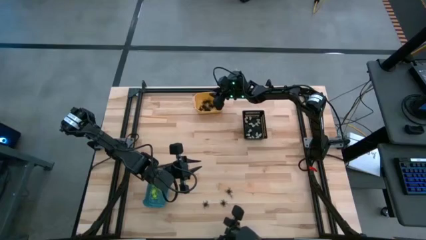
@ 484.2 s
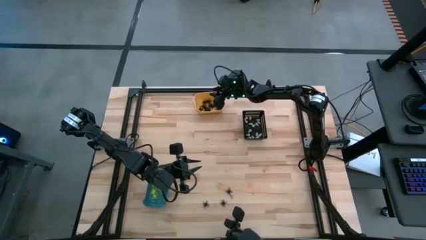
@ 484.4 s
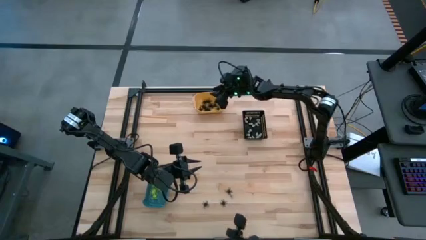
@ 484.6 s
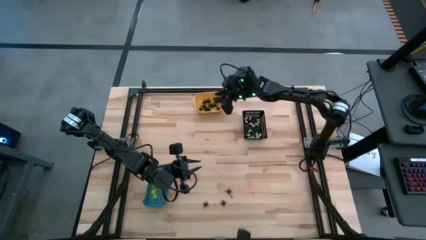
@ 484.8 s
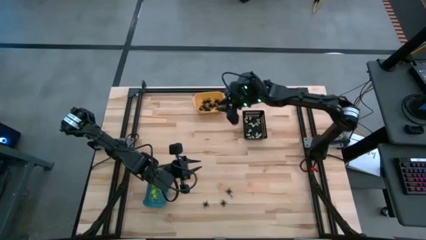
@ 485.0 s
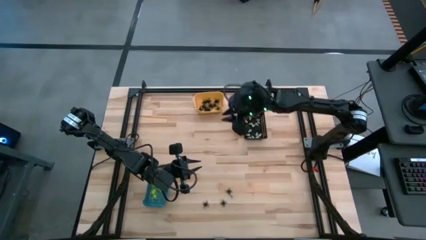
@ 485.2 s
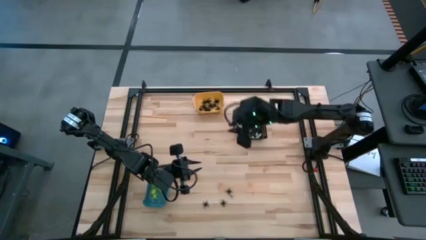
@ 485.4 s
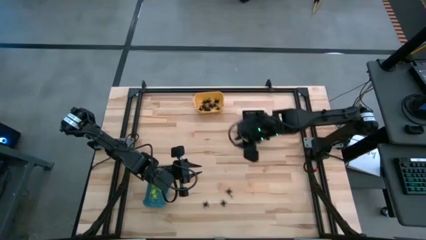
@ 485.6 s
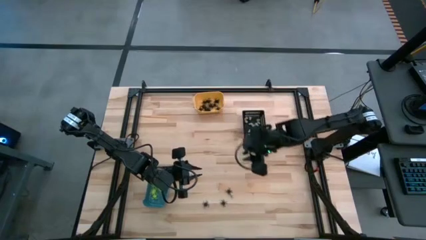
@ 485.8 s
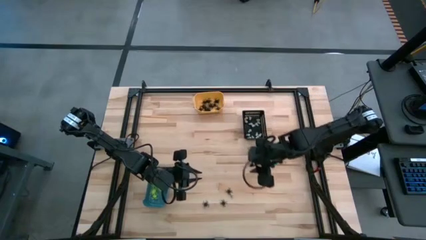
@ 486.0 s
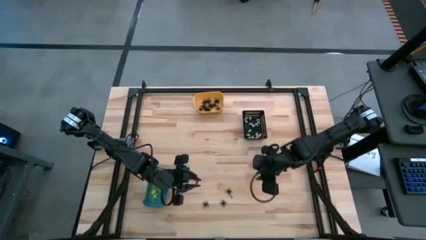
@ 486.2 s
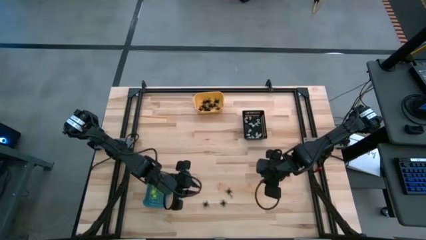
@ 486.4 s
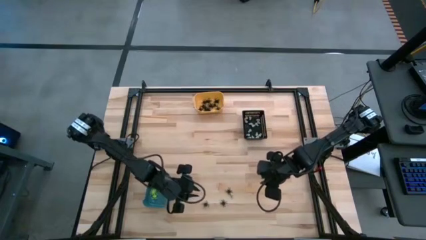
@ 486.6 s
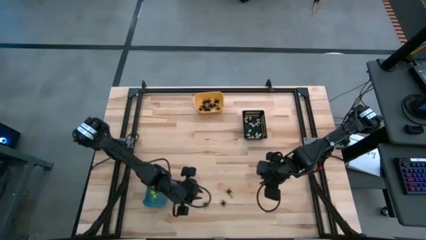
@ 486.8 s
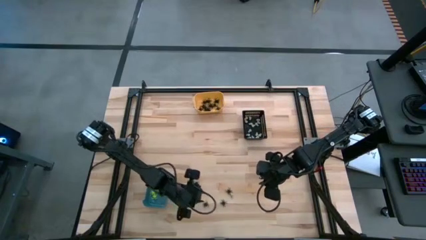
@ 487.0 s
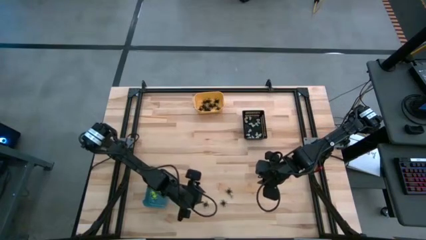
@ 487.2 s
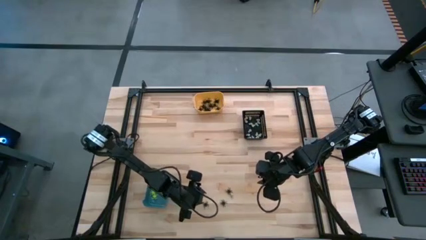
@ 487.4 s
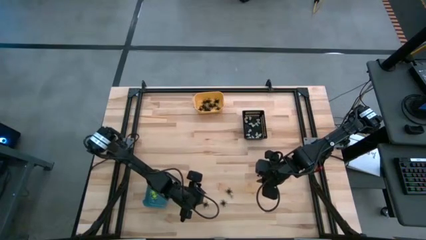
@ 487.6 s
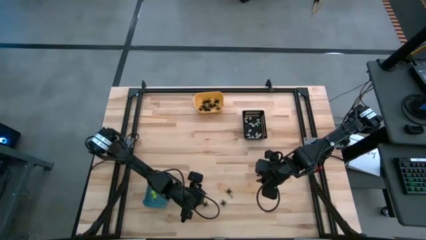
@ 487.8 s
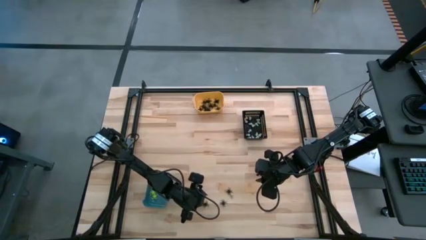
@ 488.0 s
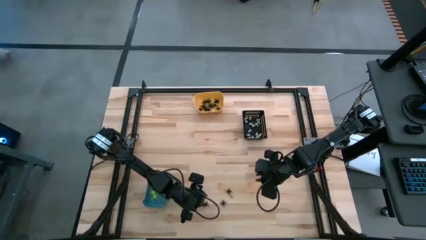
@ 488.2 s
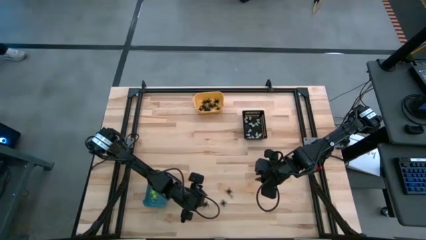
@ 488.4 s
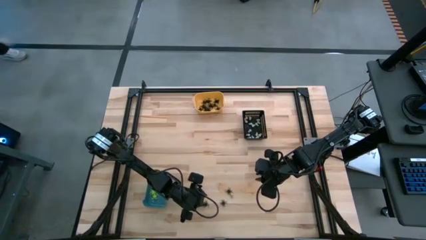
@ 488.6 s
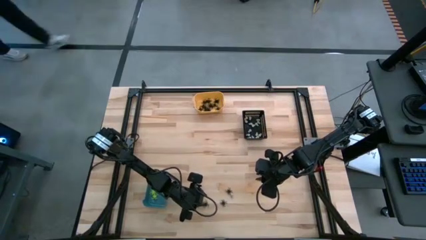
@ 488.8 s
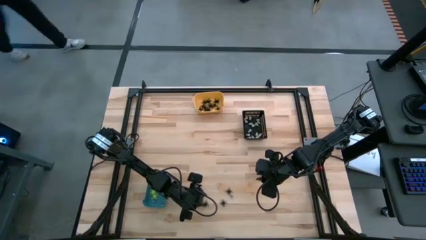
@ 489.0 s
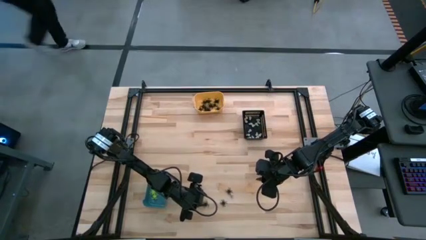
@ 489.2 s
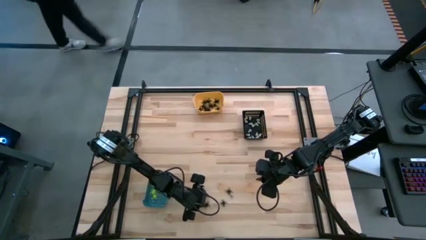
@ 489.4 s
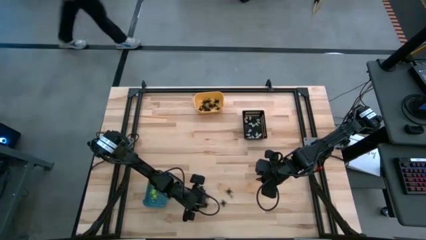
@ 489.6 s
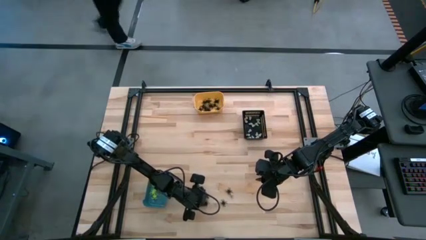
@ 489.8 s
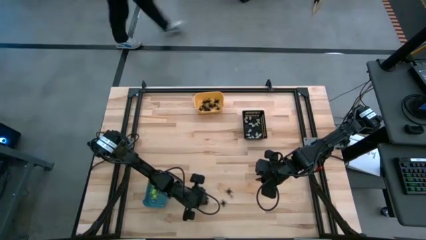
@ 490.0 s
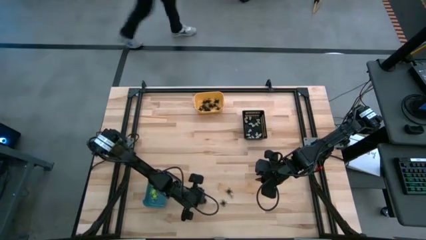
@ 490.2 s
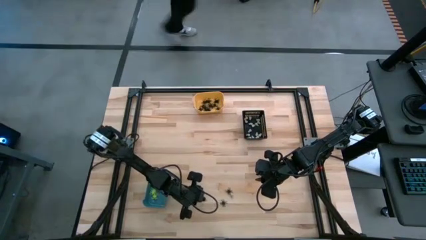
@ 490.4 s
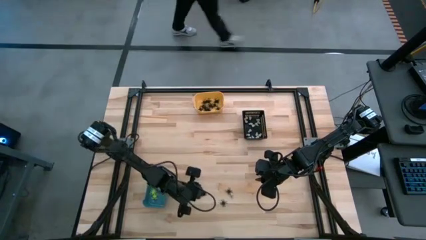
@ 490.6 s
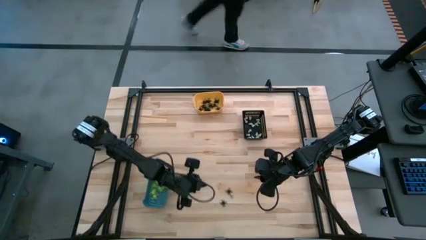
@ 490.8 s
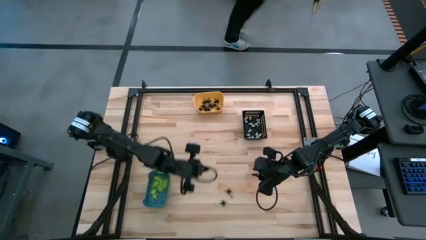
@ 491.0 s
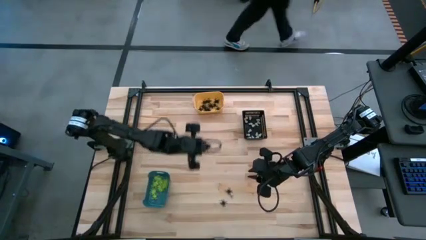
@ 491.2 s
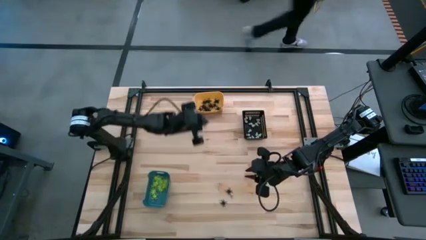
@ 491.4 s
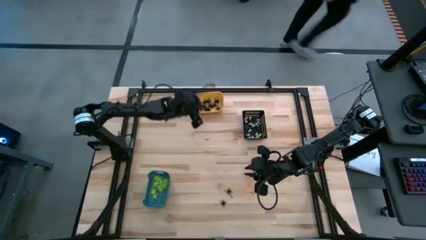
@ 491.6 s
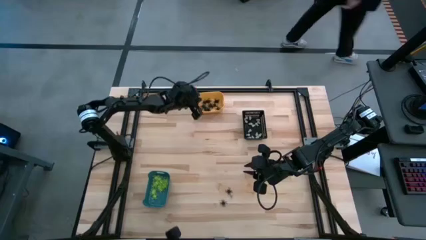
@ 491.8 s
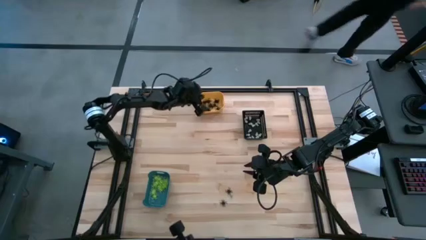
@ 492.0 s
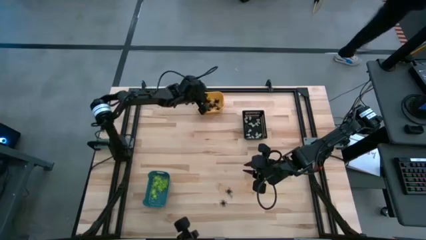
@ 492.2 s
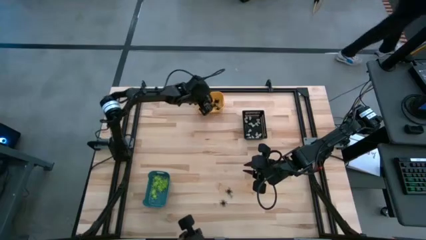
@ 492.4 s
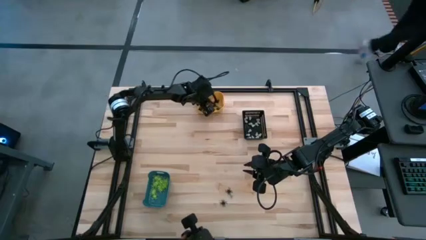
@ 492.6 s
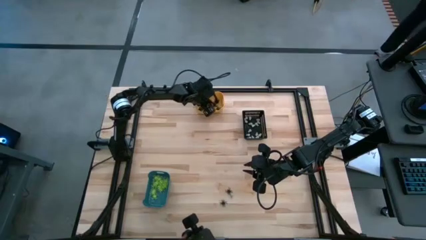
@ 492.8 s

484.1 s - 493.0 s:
Task: Sort Halloween decoration
Put the black spider toy into the yellow bin

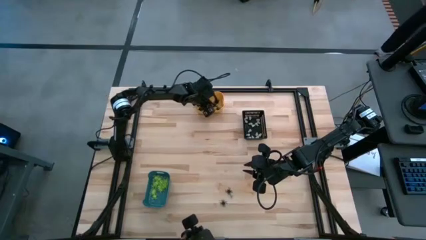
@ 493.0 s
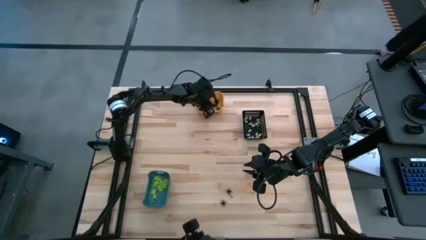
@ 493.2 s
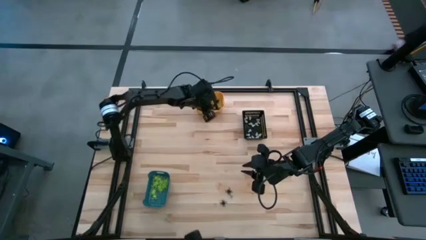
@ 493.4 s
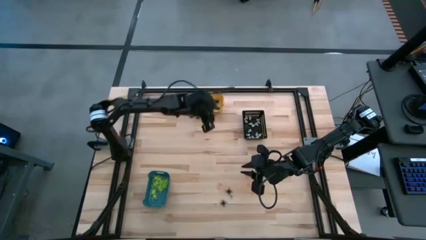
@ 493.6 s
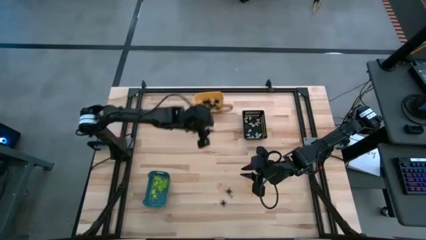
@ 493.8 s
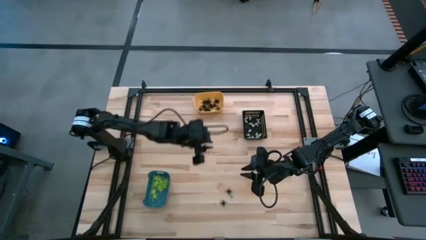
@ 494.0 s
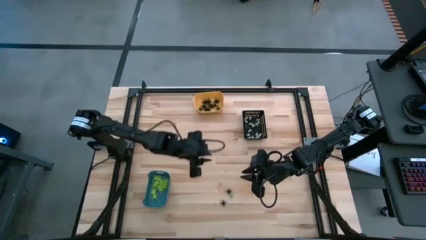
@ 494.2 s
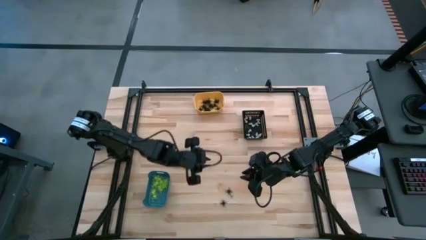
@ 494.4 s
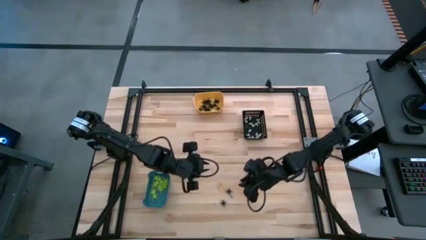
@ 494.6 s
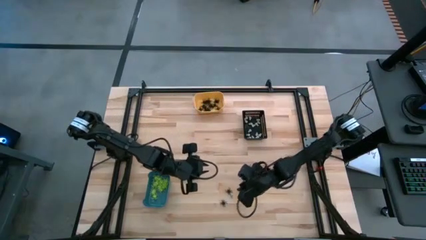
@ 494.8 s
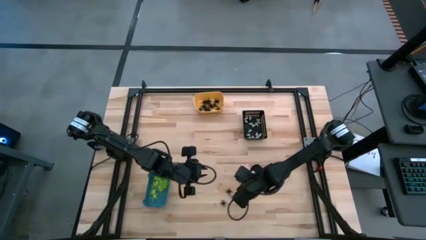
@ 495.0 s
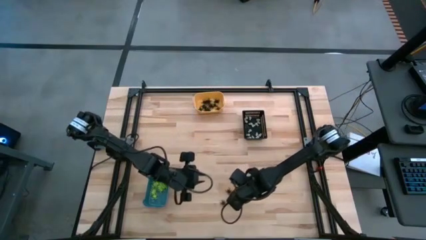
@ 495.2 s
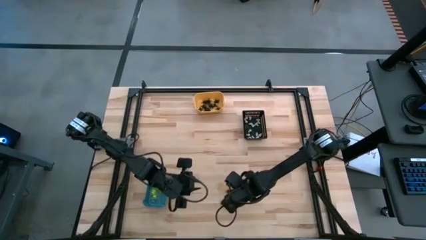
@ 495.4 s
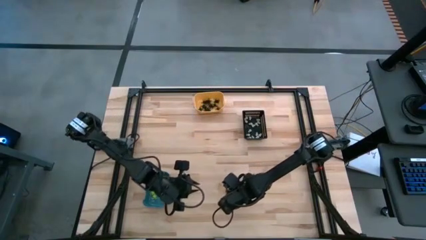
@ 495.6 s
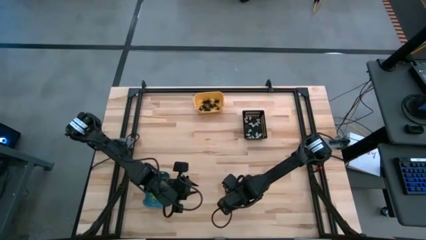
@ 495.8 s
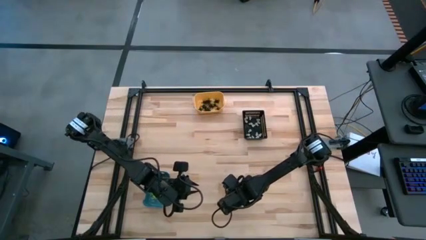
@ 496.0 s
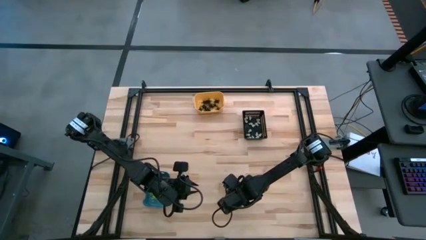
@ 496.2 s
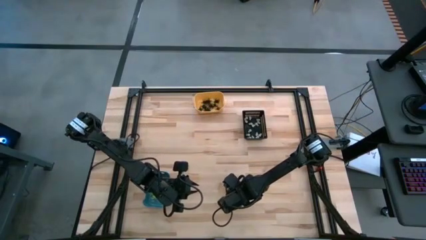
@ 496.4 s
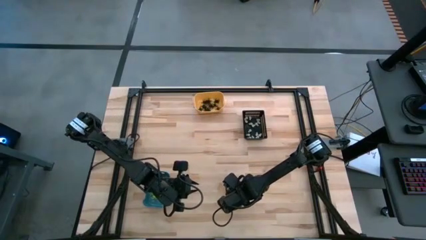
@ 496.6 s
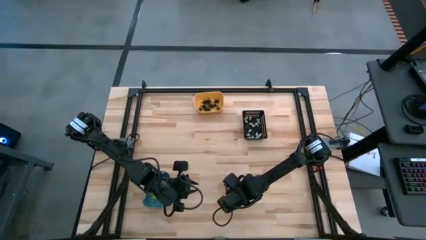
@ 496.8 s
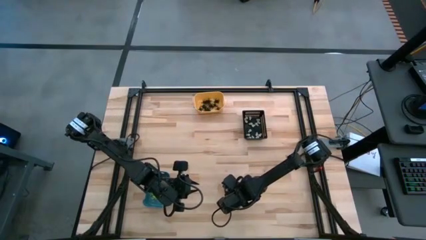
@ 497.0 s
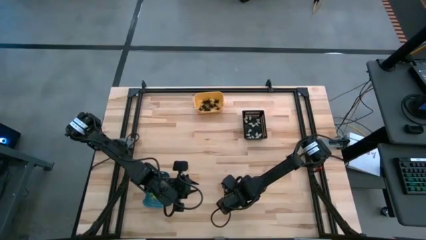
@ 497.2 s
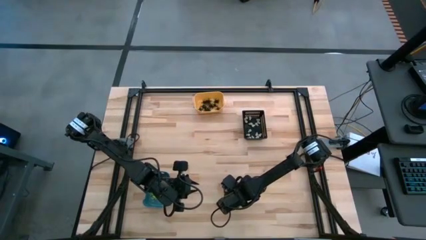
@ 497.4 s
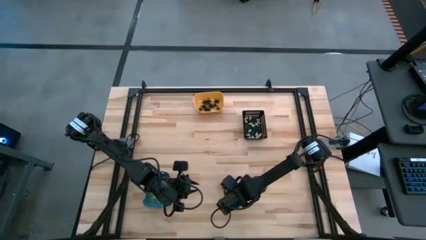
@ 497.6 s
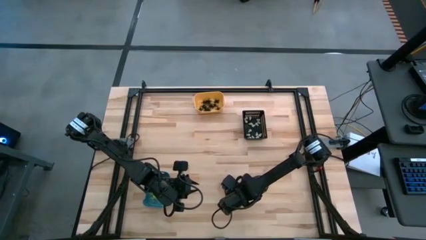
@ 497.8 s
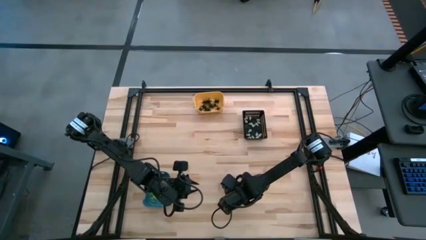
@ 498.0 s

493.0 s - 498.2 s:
Put the black spider toy into the yellow bin

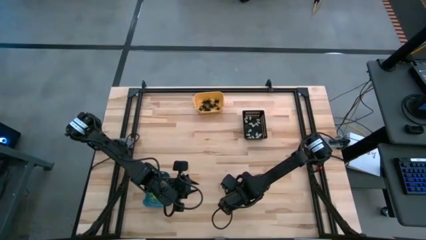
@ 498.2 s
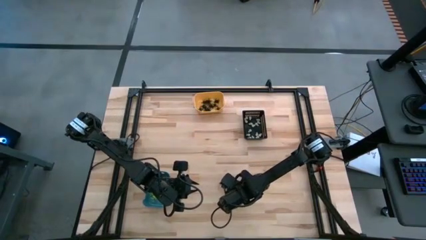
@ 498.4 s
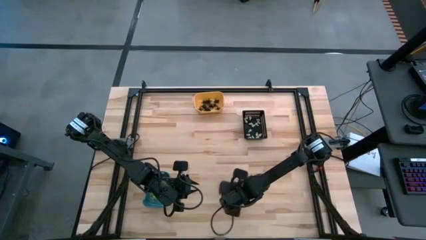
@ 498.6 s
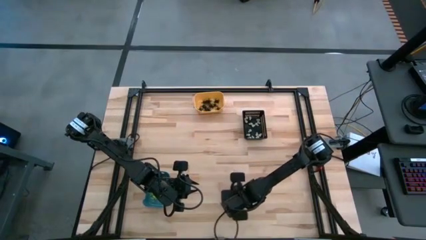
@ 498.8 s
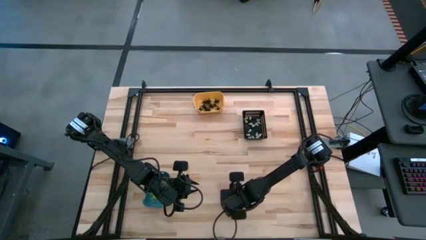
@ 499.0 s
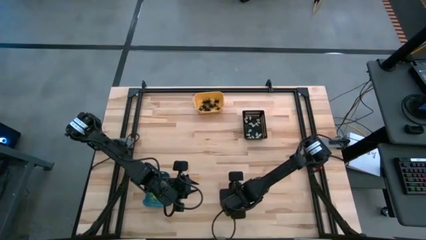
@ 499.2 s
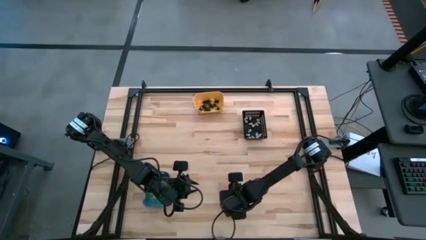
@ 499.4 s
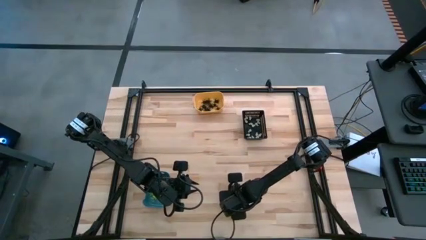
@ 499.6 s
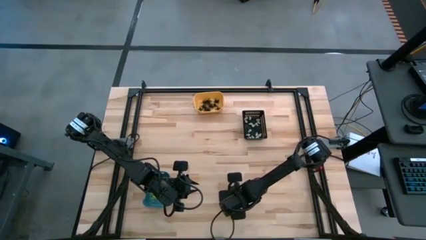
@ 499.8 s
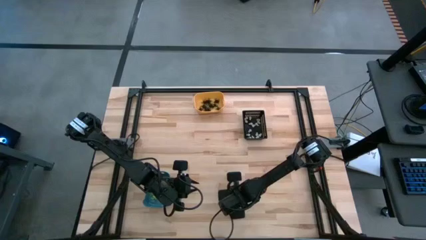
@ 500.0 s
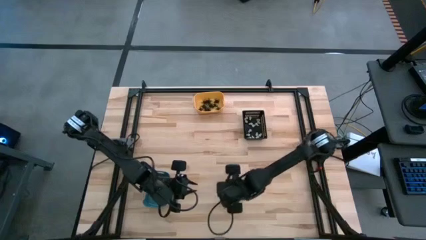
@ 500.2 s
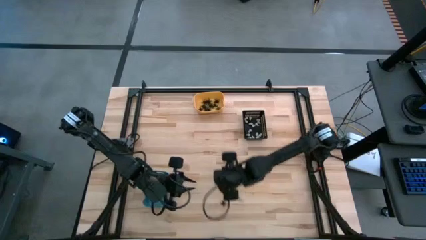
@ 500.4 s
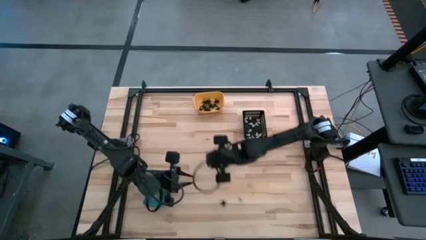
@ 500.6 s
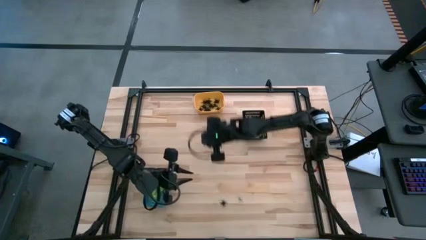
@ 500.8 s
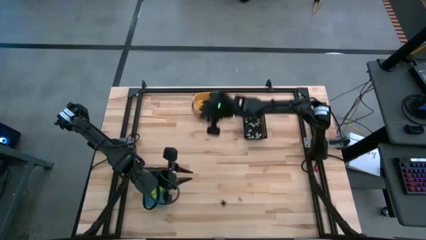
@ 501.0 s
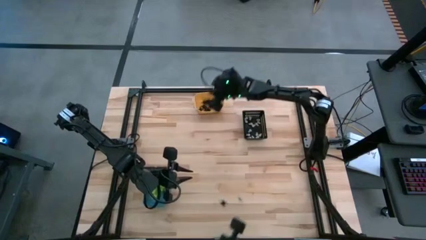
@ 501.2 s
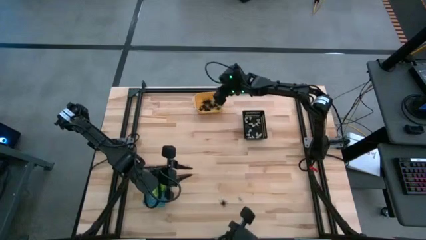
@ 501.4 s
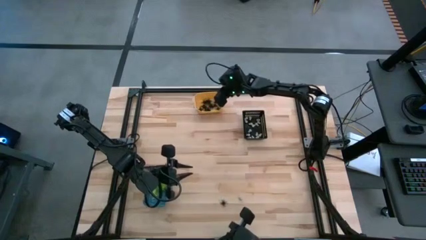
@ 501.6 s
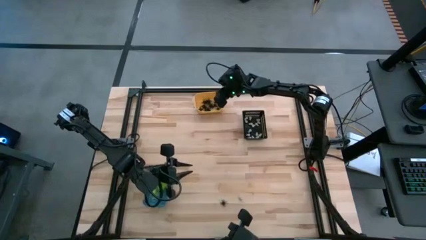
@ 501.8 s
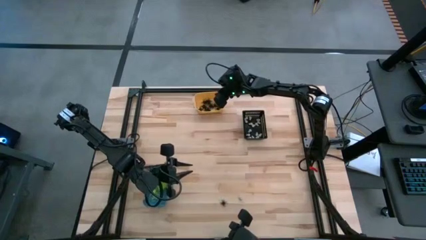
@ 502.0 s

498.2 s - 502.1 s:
Put the black spider toy into the yellow bin
